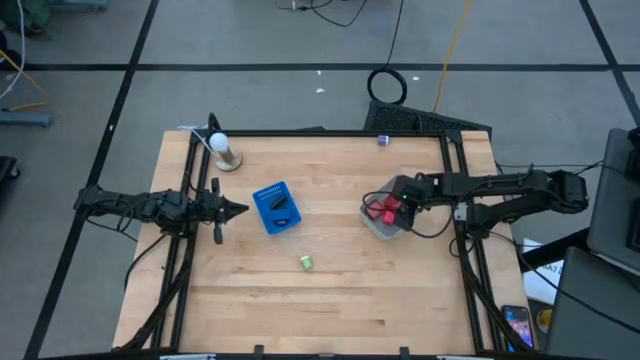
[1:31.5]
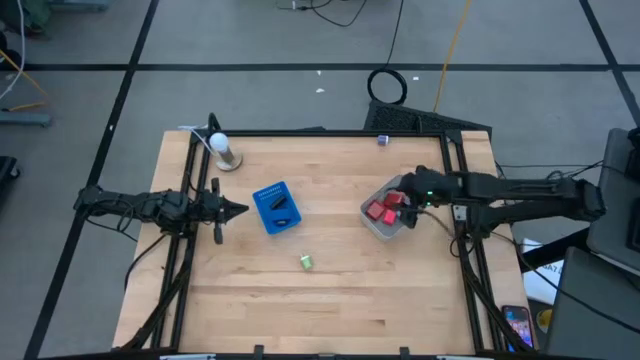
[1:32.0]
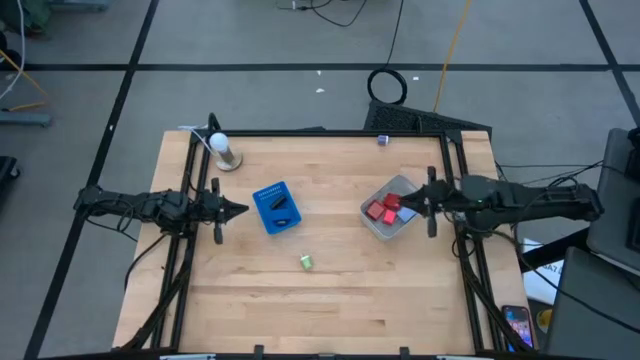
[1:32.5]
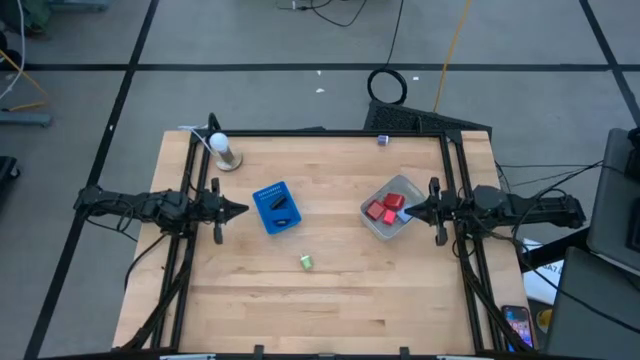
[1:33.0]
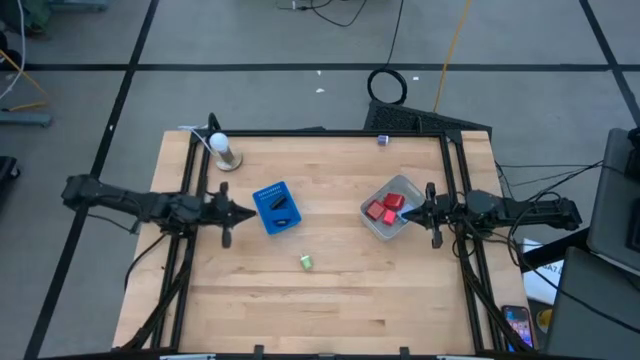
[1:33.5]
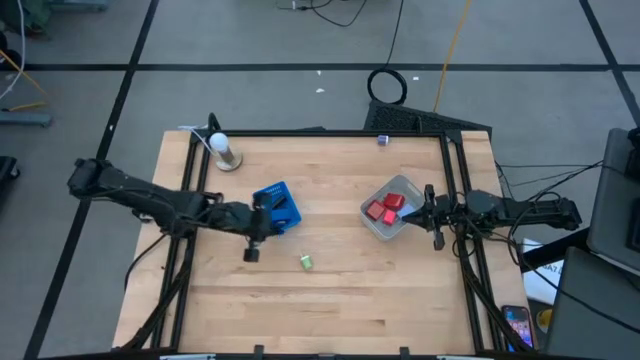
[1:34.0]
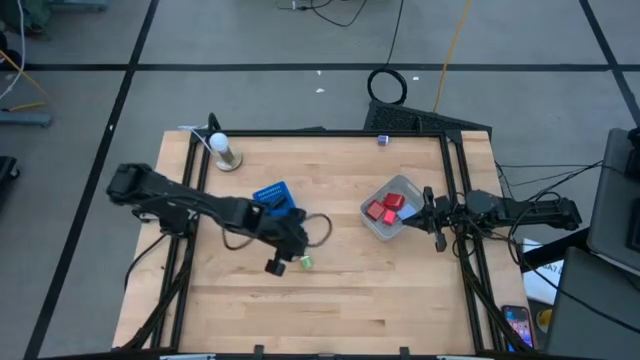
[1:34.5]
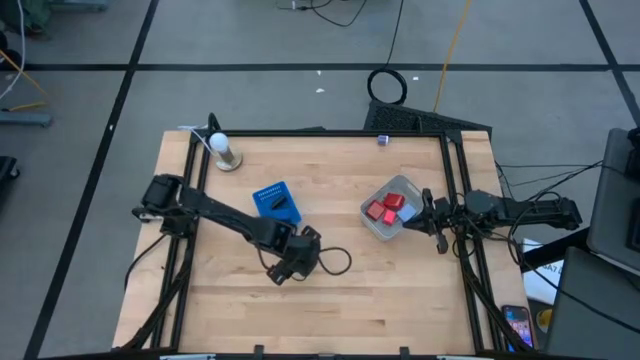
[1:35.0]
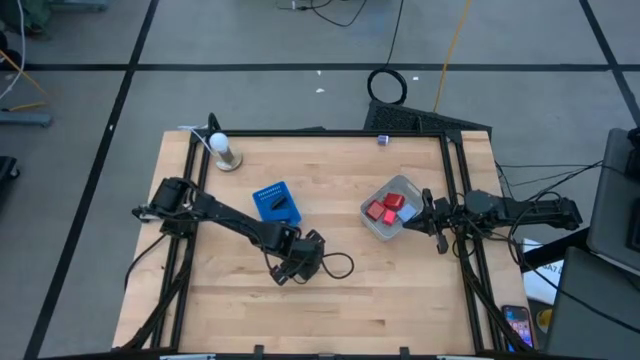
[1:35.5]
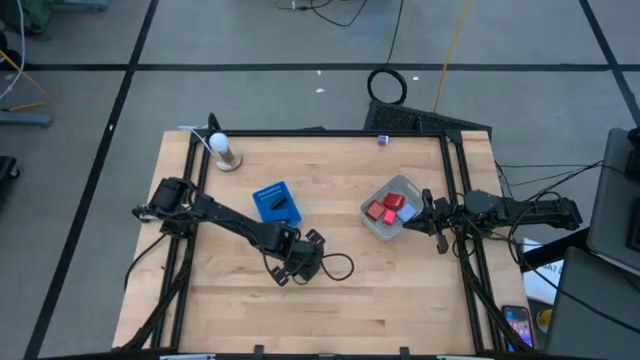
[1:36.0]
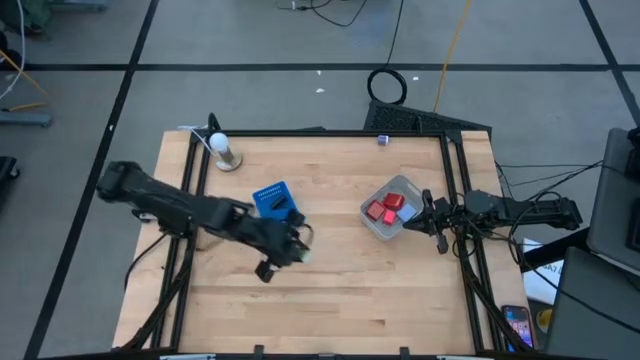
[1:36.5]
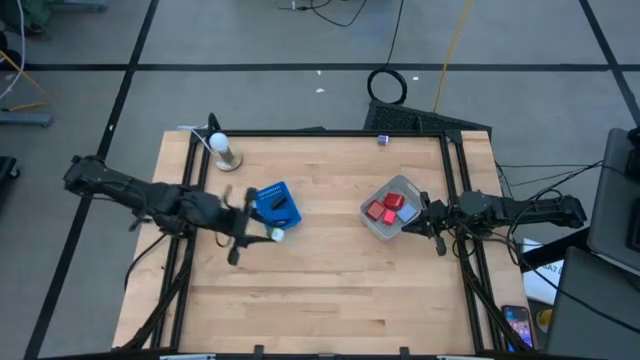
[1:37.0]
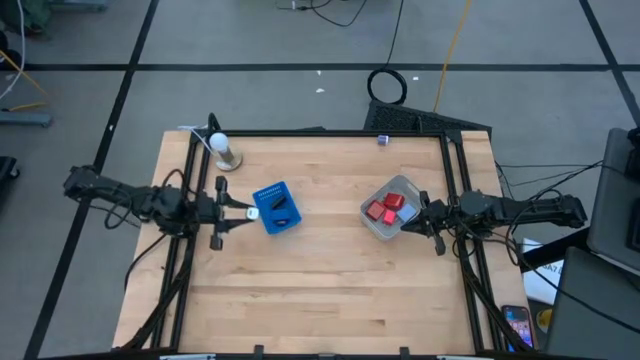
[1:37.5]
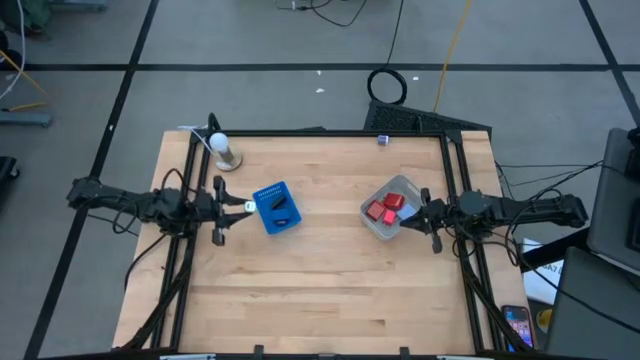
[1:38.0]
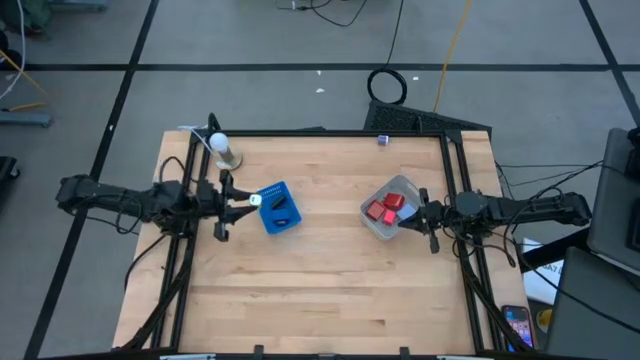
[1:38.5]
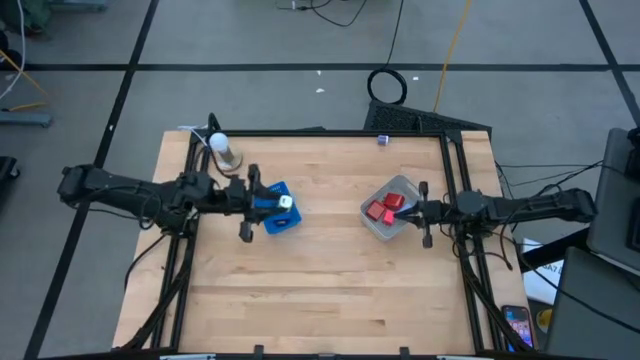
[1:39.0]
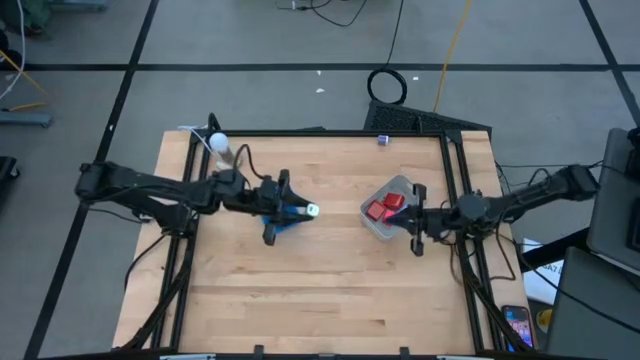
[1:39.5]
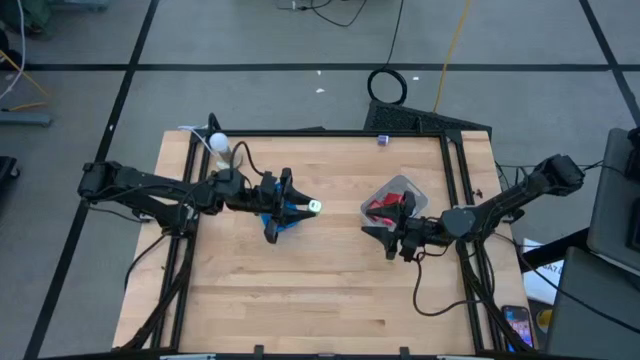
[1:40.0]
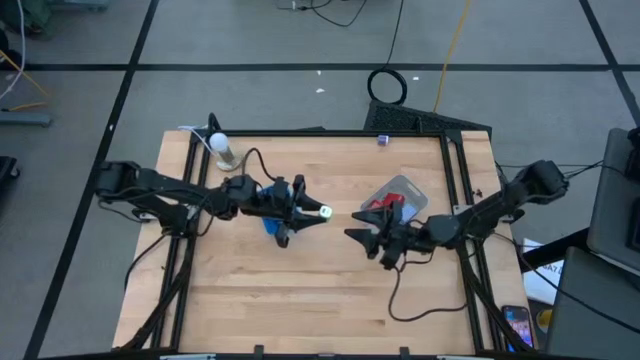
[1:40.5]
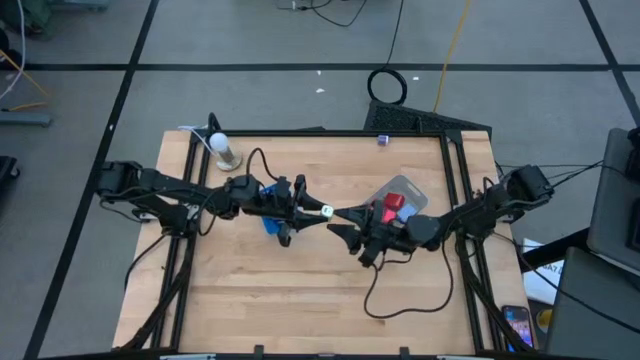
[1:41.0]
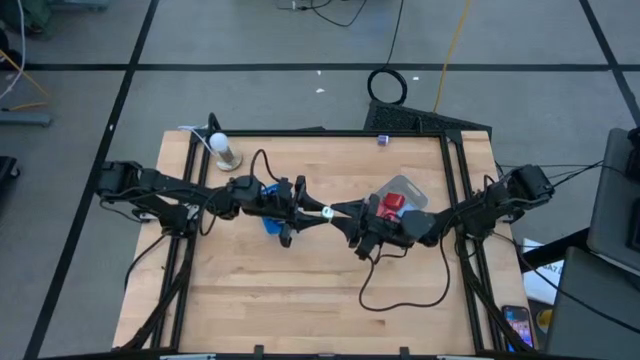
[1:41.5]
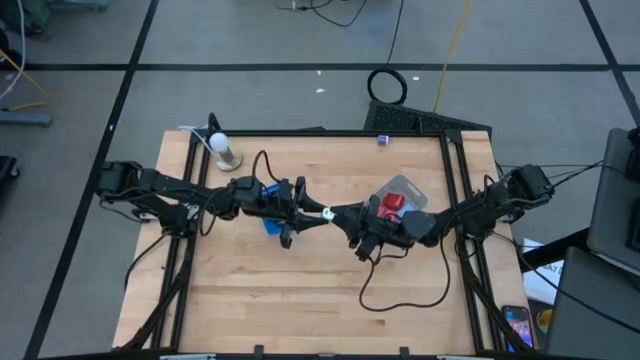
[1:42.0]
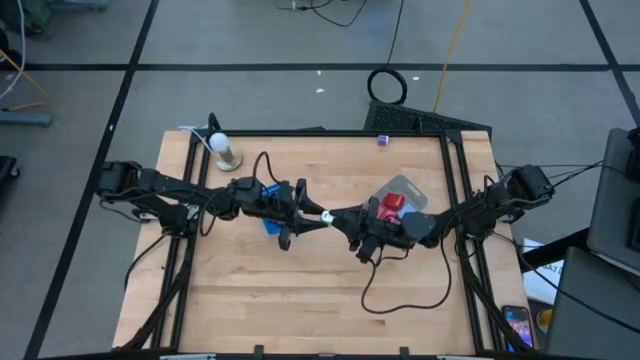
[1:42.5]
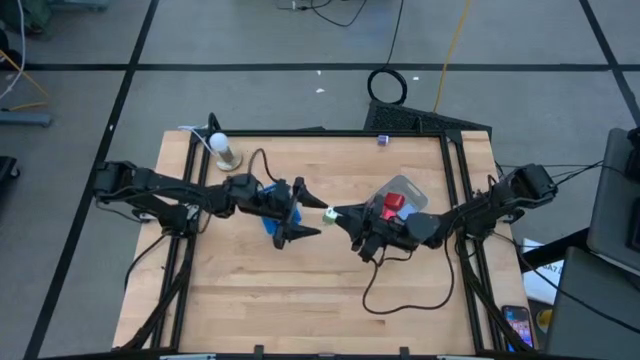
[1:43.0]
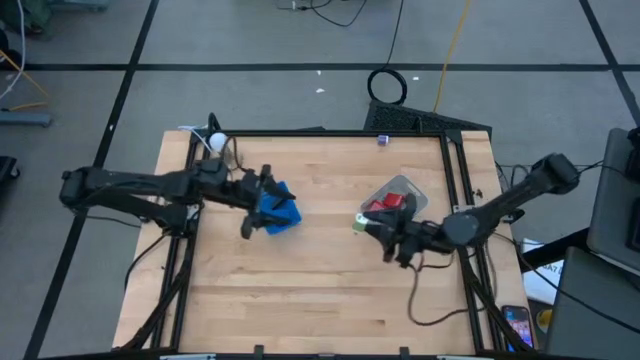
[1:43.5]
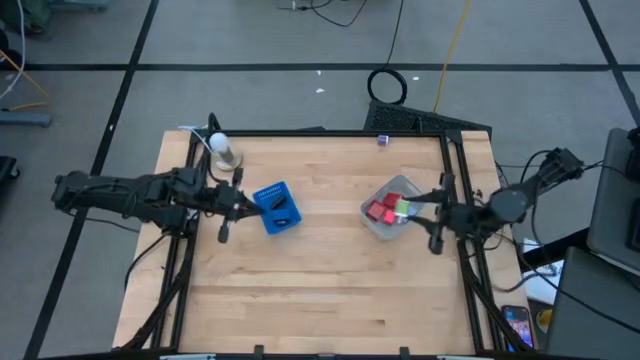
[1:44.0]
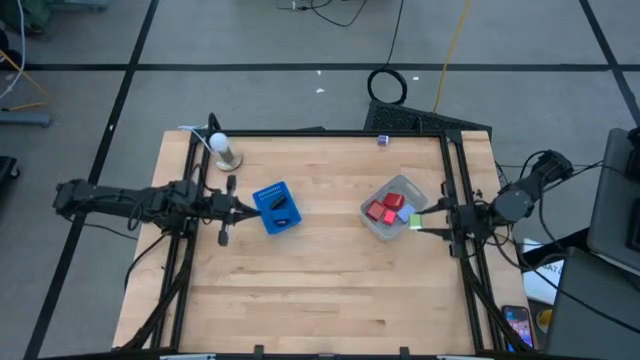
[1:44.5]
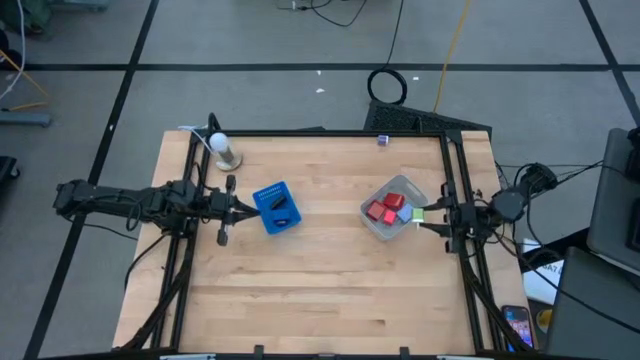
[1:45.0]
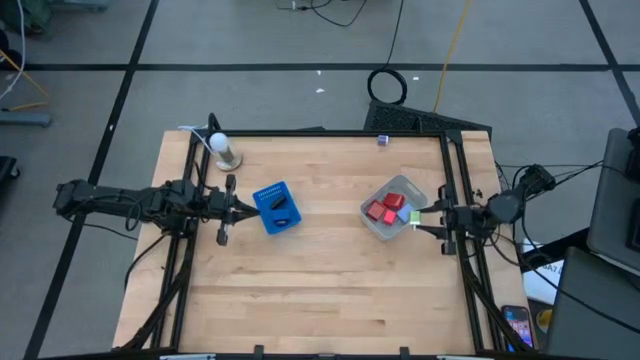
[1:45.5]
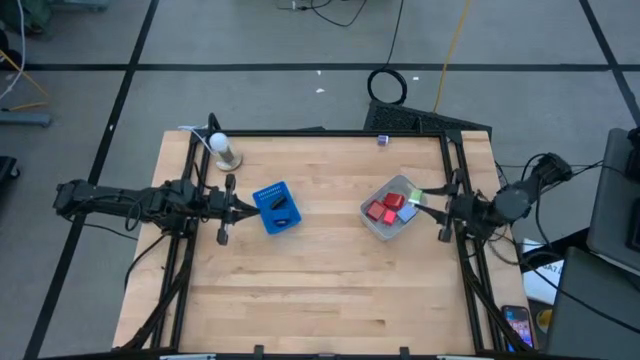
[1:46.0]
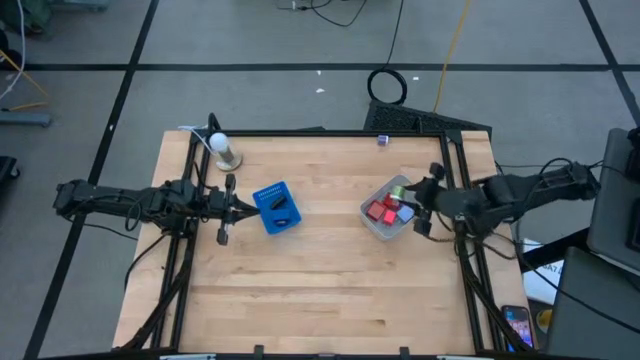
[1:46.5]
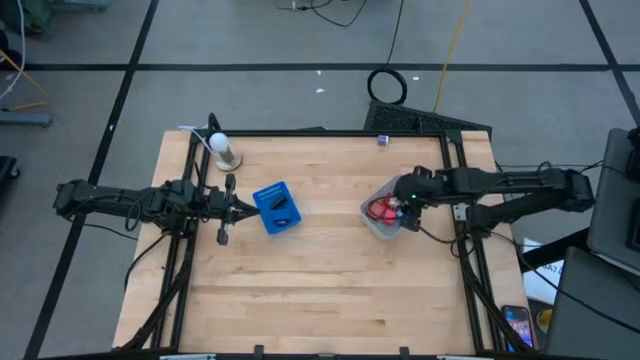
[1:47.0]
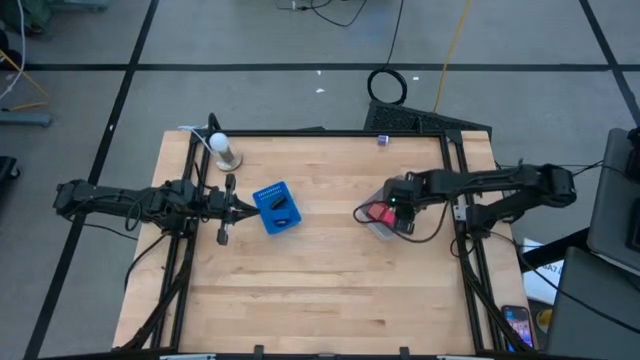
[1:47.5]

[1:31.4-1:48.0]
Task: Pick & Place Office items
Put the green charger adapter into the grey bin

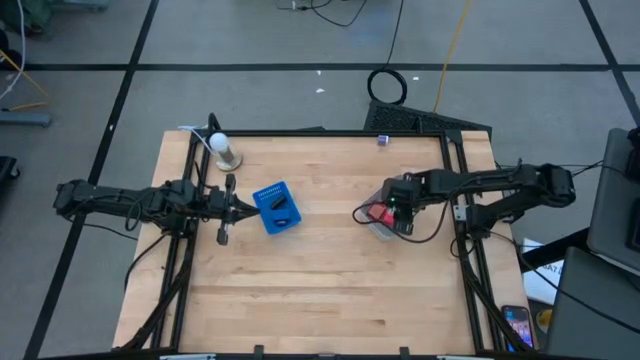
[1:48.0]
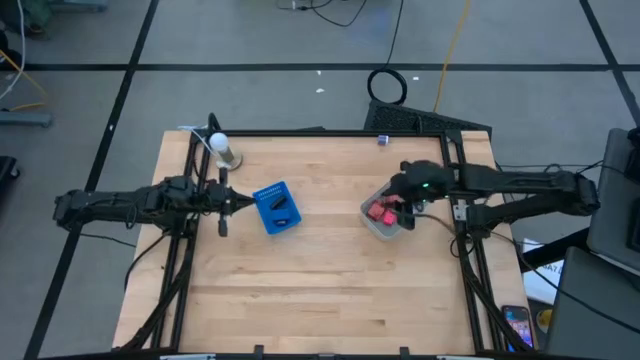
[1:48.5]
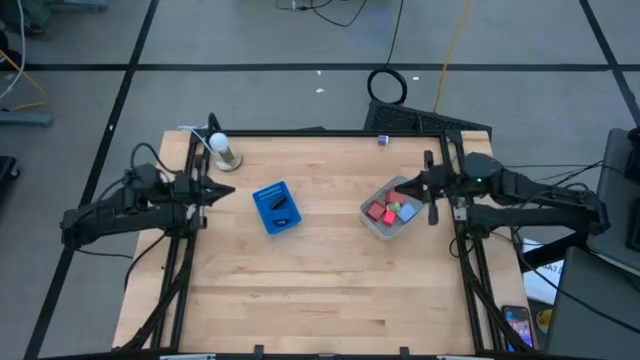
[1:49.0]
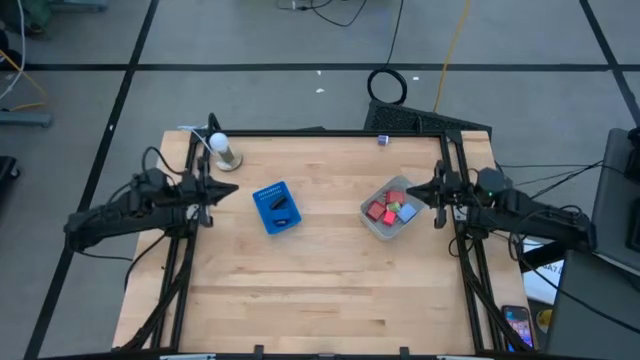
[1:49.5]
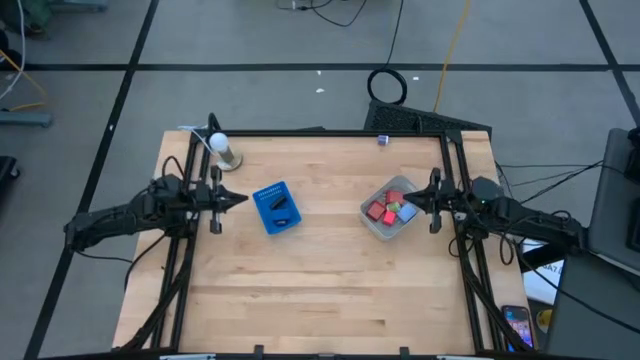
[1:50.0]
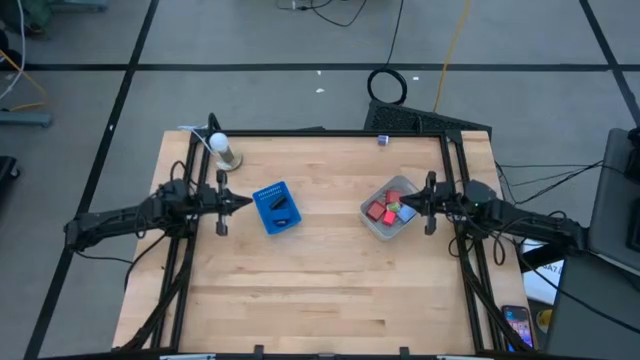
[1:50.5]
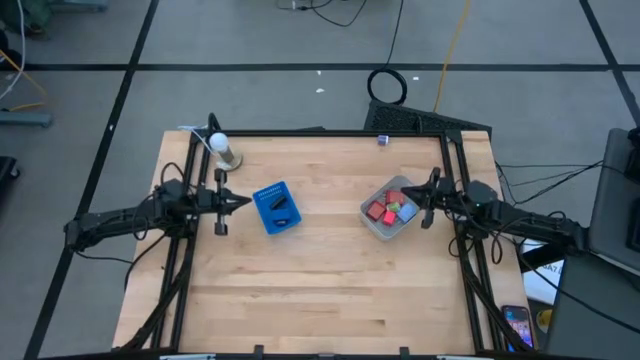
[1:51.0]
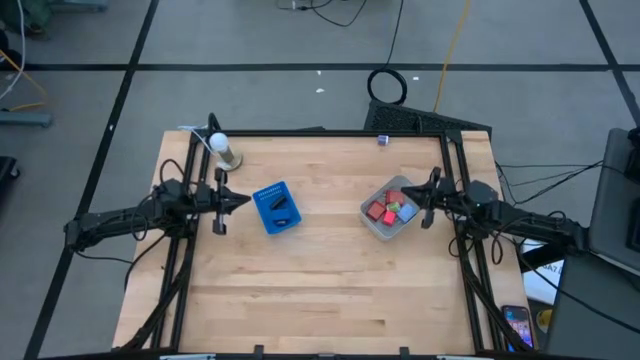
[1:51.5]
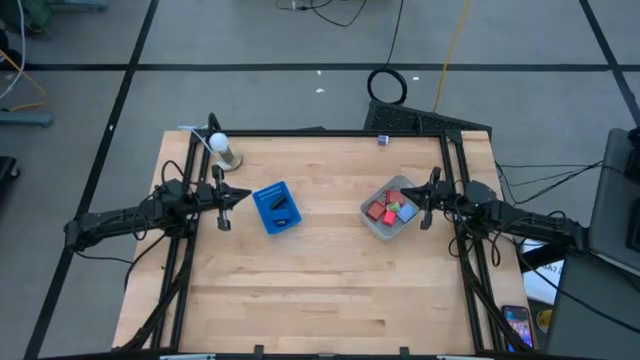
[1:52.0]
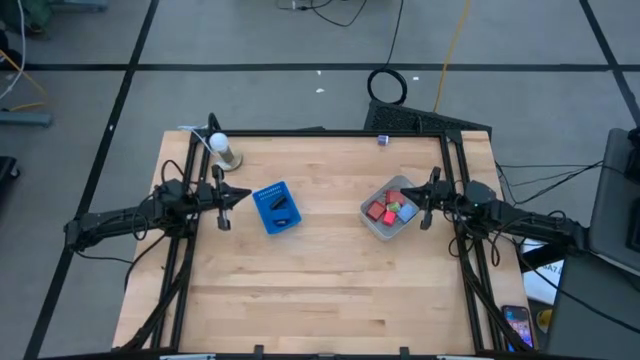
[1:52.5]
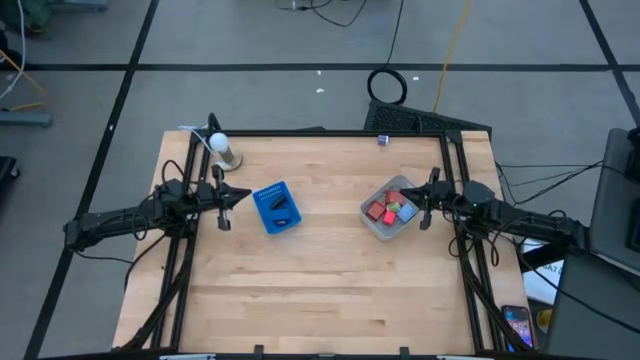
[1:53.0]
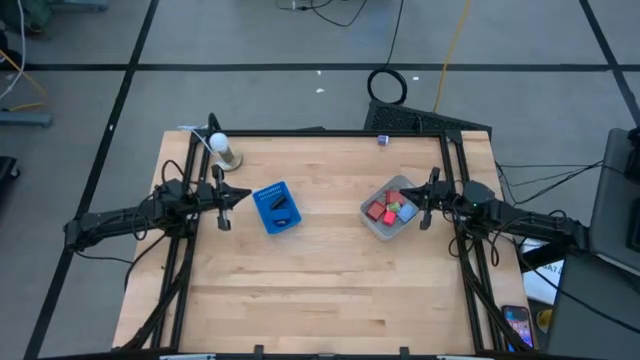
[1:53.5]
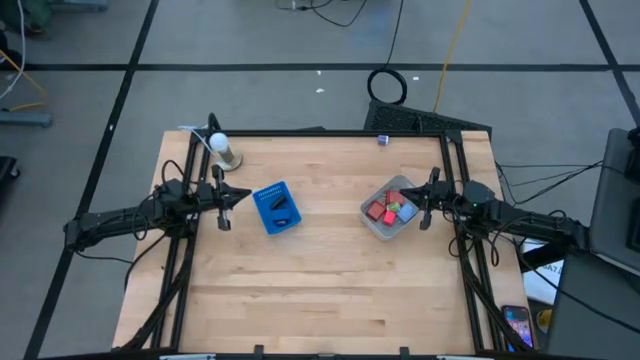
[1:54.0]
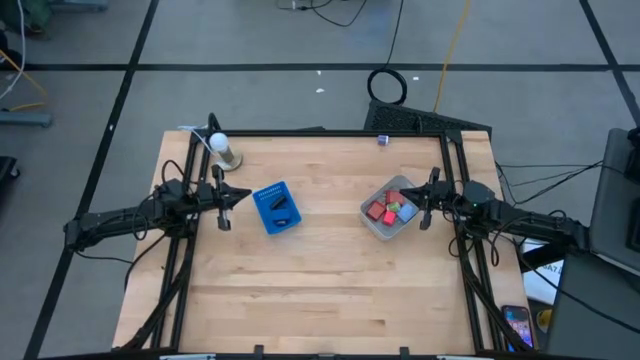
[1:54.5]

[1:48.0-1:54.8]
Return to Home Position
